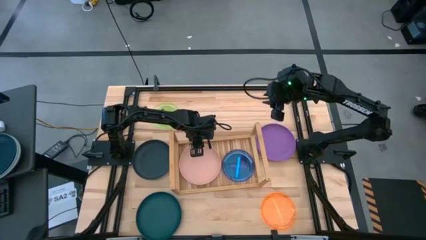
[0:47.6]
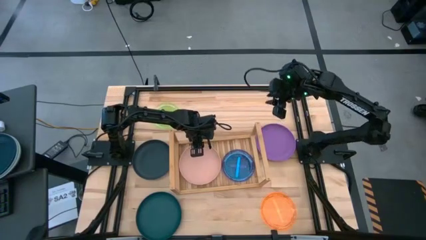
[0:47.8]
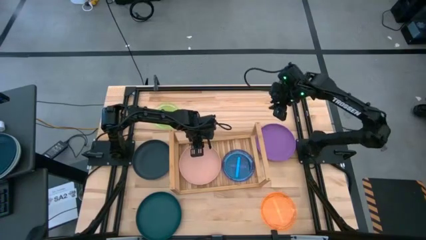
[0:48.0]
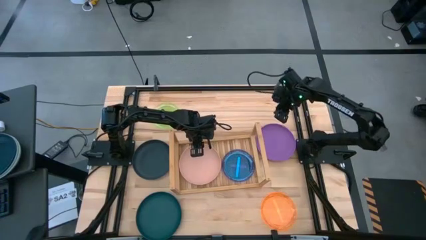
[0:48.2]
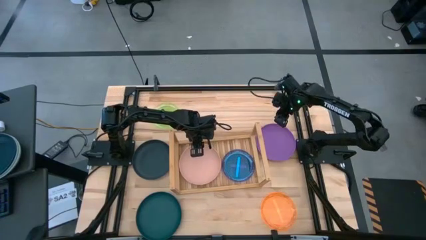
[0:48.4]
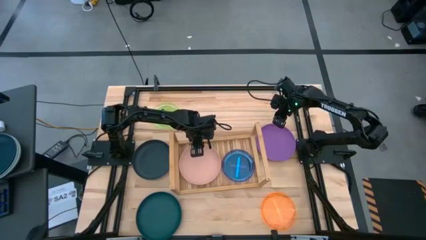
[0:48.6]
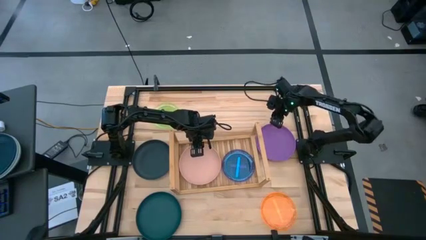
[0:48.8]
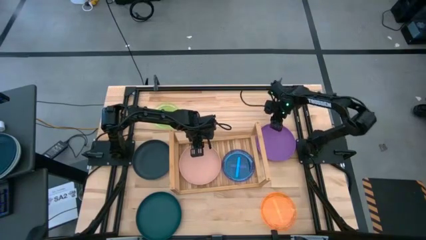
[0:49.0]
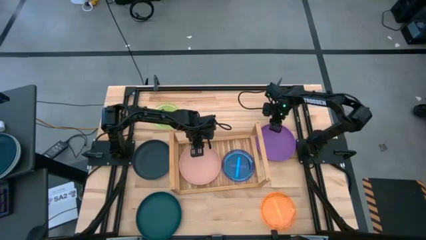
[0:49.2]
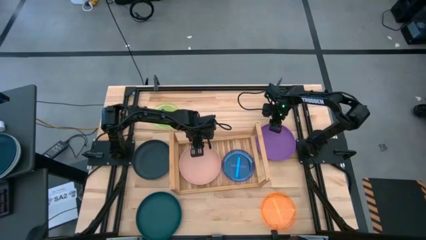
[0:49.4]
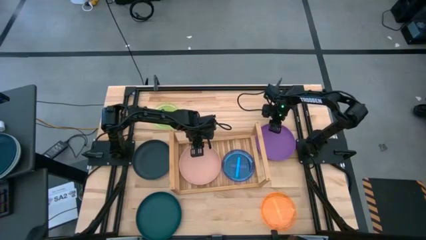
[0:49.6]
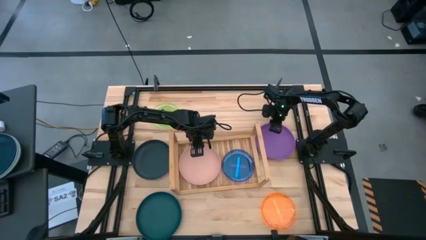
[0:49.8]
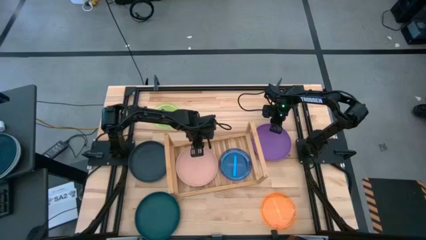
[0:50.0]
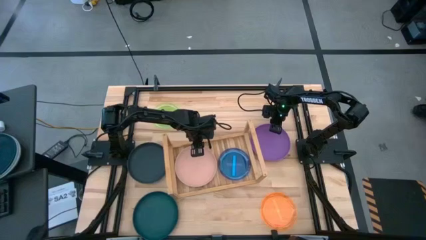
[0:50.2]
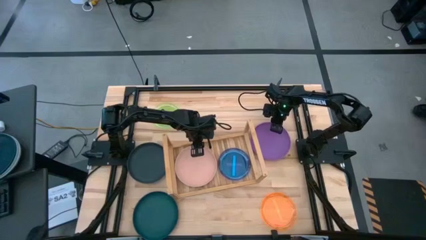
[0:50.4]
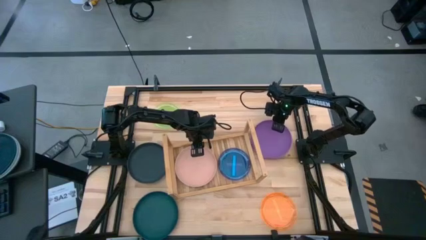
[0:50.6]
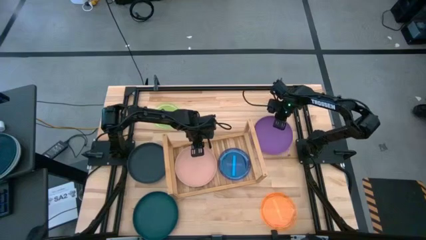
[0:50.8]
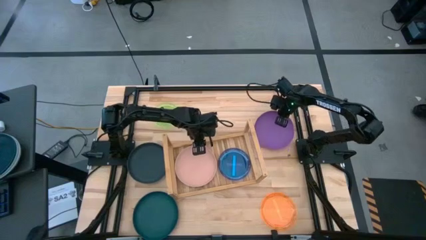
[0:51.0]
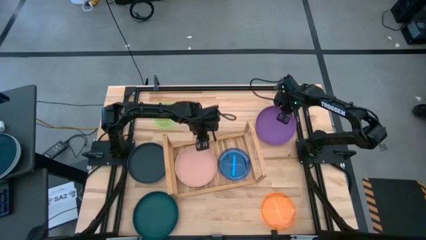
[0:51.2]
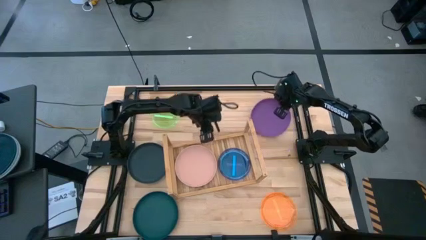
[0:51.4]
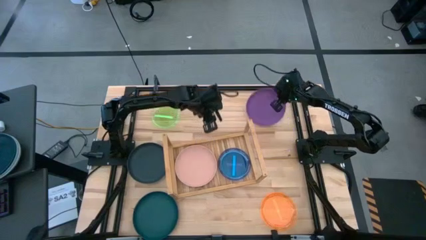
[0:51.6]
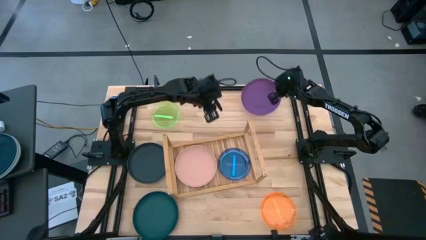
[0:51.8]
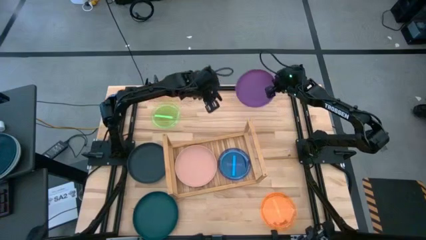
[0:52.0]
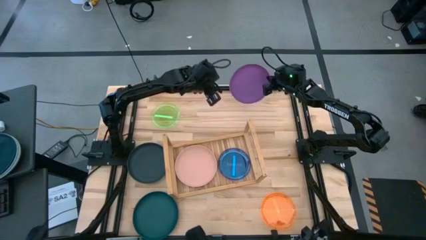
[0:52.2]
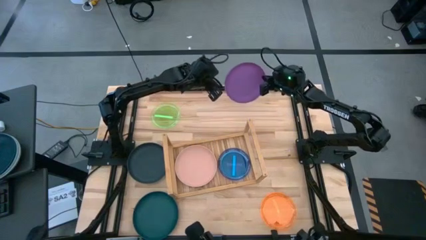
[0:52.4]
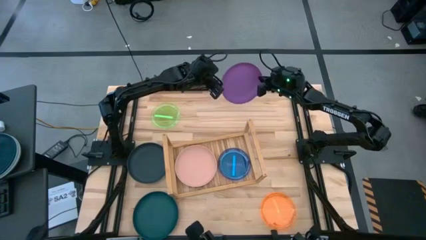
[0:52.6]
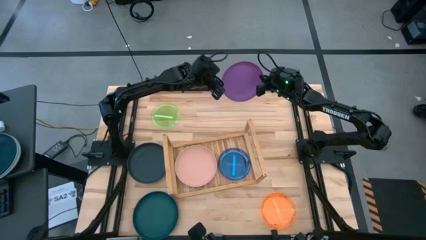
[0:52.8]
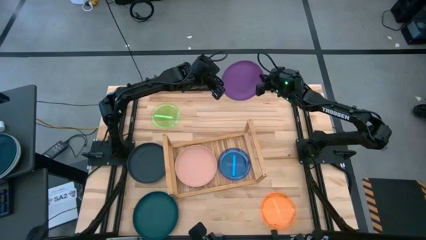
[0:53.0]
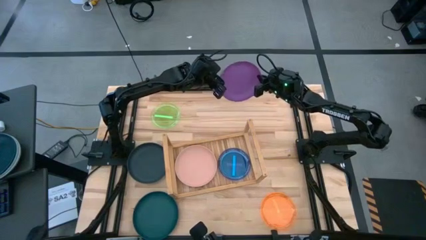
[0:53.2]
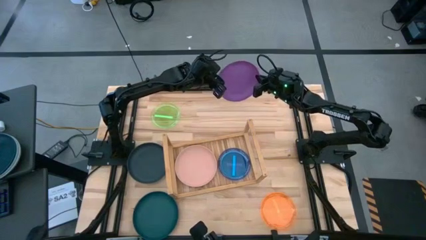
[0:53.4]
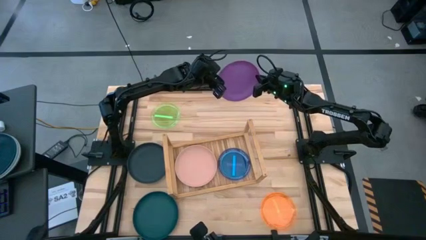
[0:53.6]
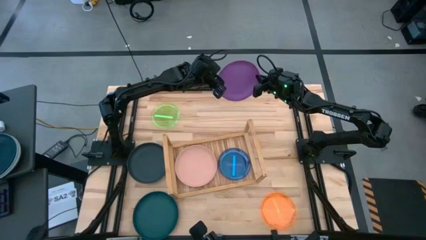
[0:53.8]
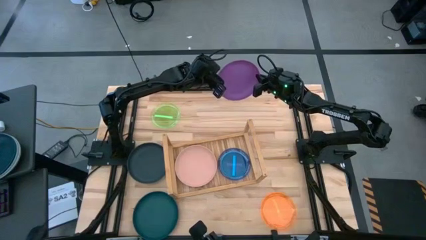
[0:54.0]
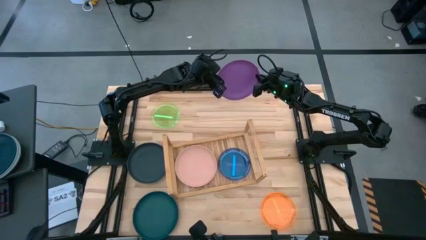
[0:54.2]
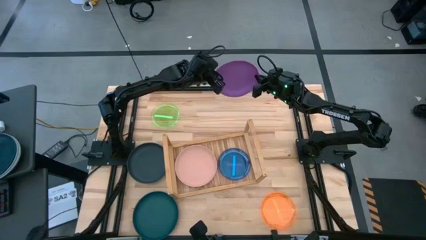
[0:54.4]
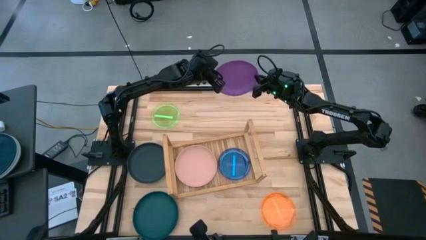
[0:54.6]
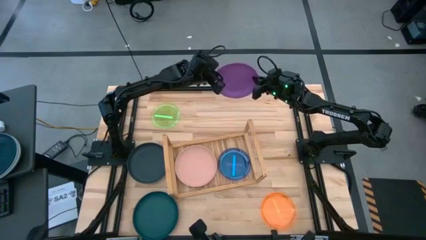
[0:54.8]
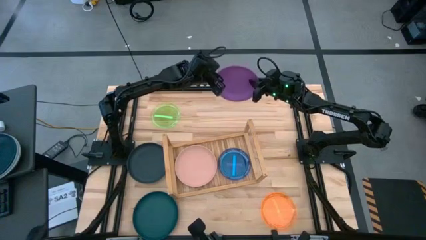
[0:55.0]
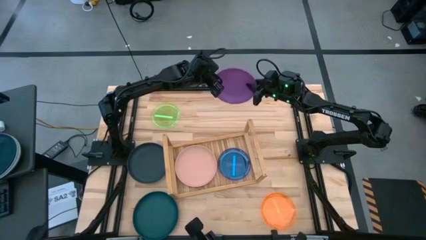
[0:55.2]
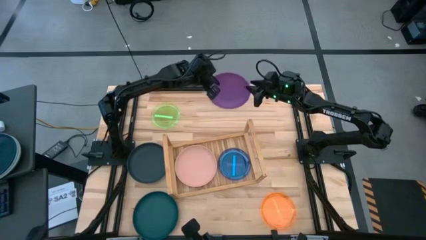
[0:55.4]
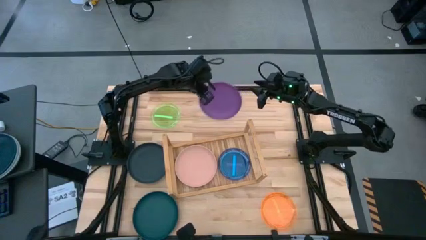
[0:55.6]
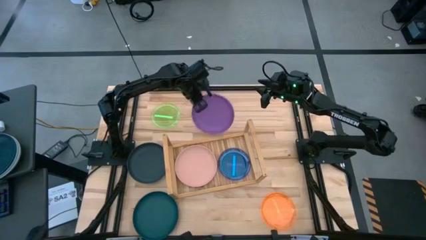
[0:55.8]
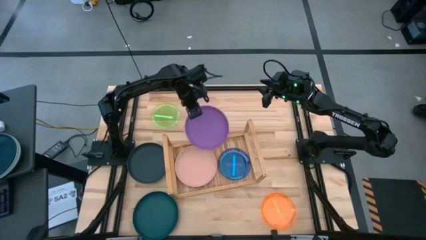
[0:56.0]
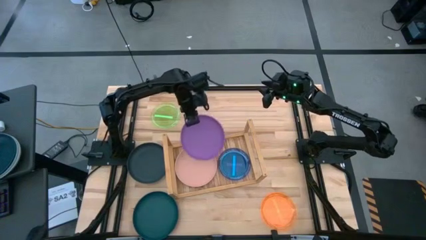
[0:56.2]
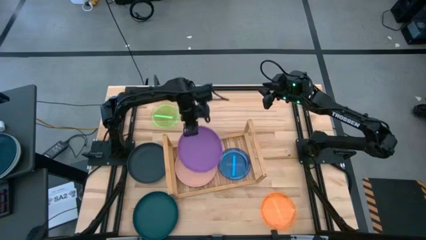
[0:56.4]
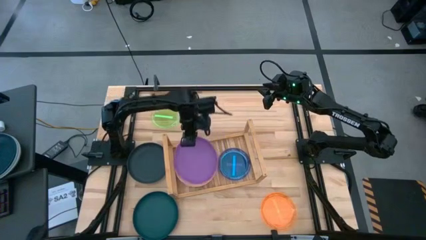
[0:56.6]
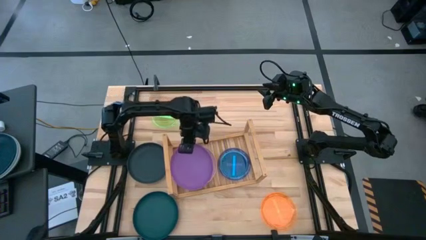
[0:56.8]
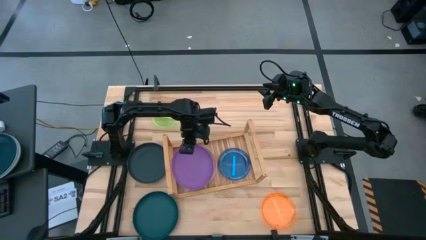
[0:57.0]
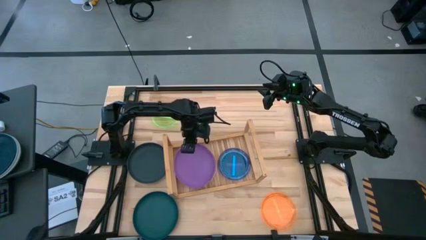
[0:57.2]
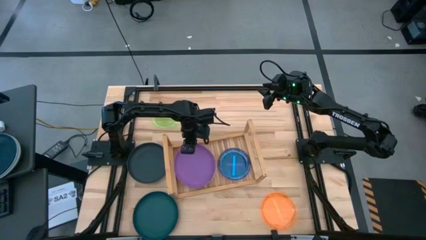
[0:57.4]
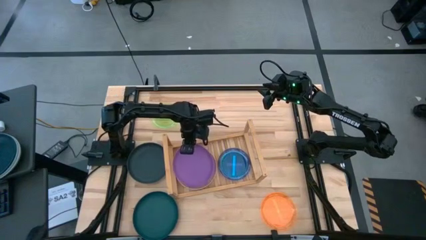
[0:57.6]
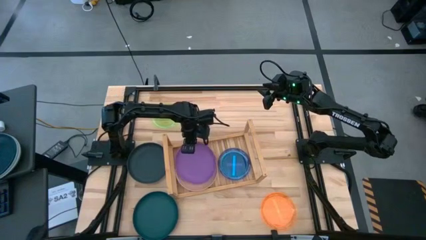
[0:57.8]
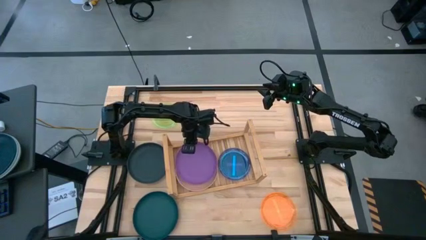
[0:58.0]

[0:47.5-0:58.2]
Task: Place and stack plates onto a shelf
Stack the violet plate on top of the pink plate on the shelf

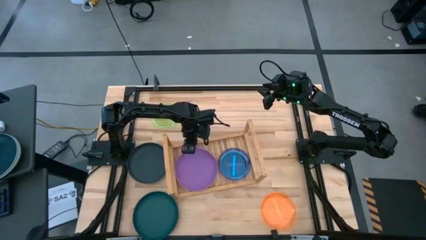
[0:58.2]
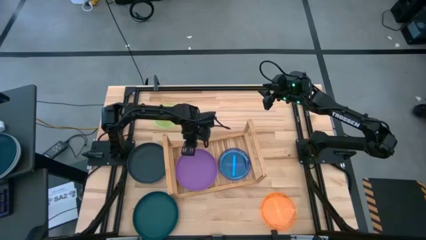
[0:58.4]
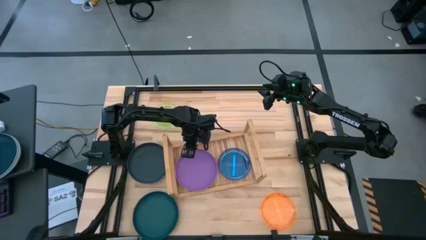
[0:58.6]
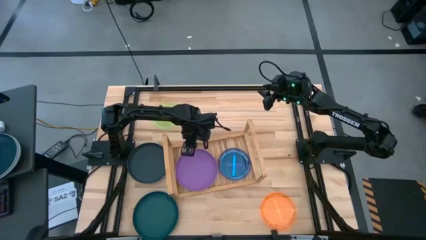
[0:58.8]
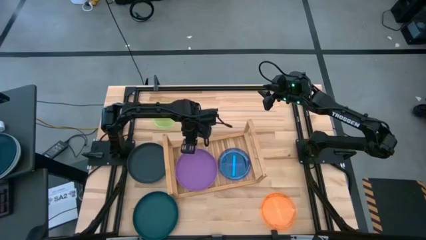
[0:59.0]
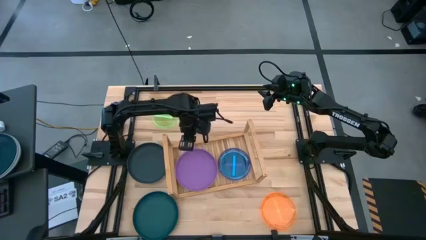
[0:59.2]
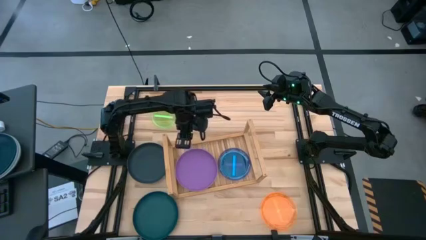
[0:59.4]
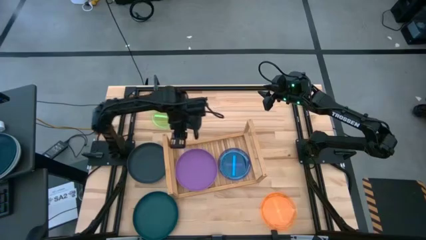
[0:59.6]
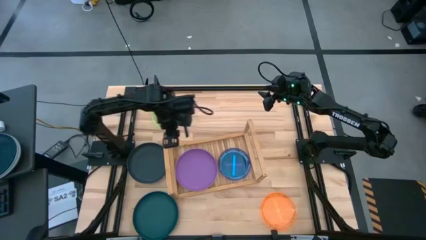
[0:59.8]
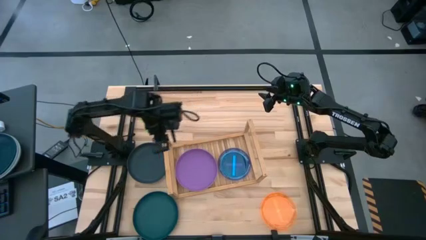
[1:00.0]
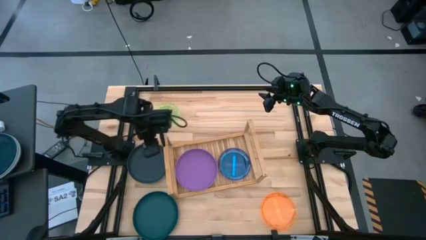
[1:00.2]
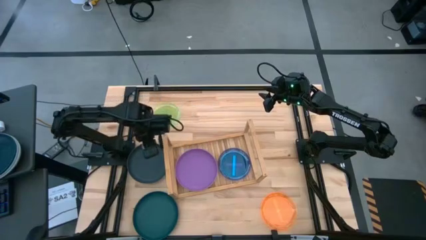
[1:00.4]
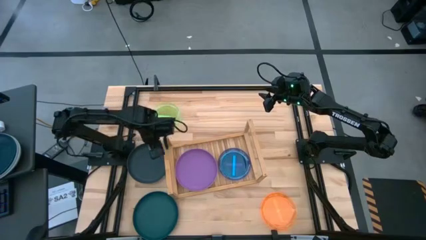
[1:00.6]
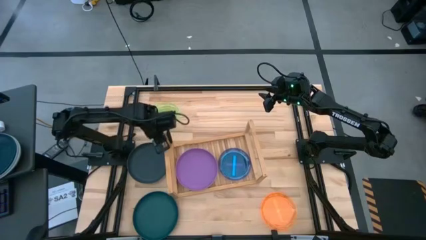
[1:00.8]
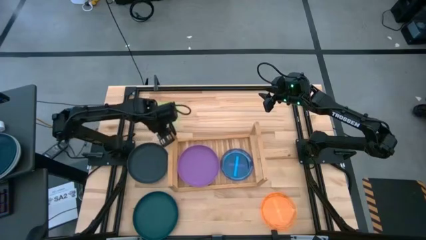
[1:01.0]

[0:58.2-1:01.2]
Adjust the shelf
